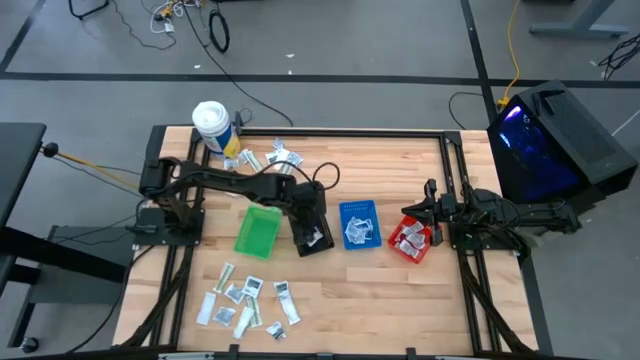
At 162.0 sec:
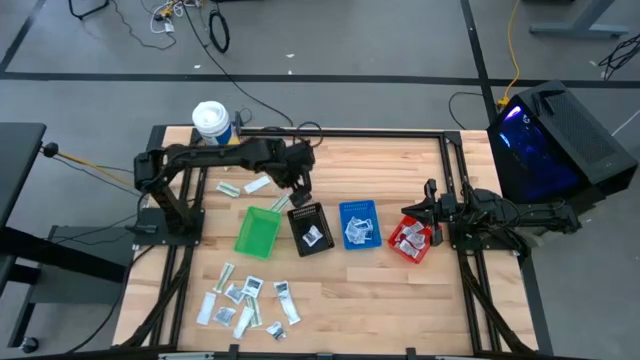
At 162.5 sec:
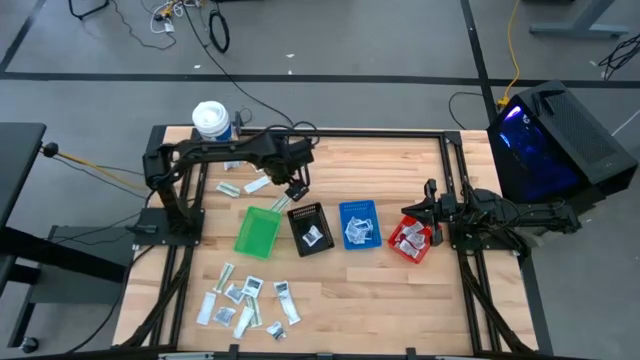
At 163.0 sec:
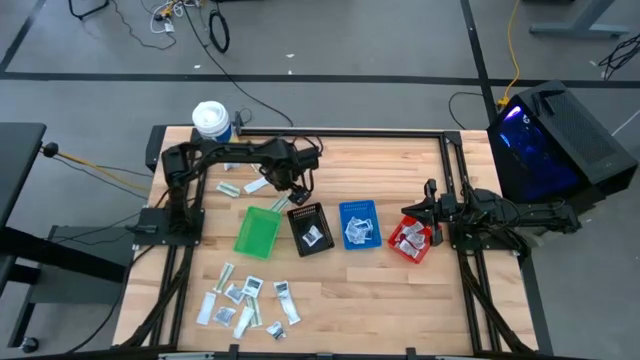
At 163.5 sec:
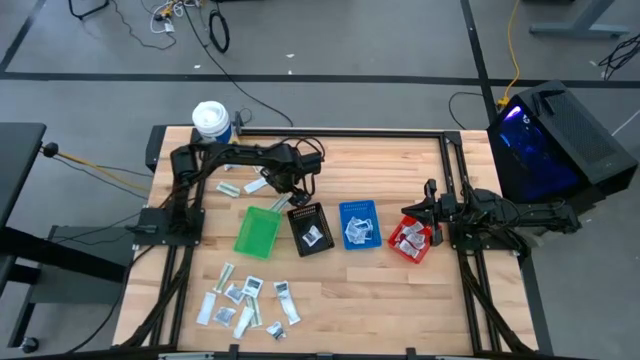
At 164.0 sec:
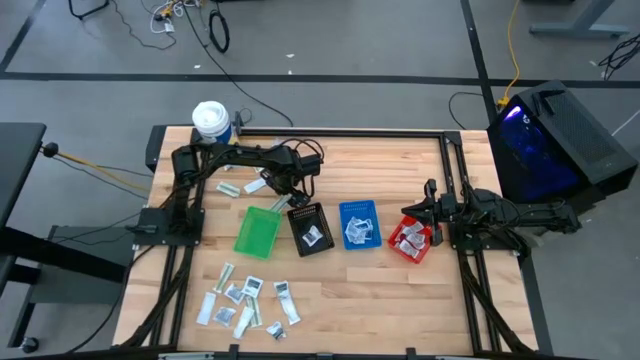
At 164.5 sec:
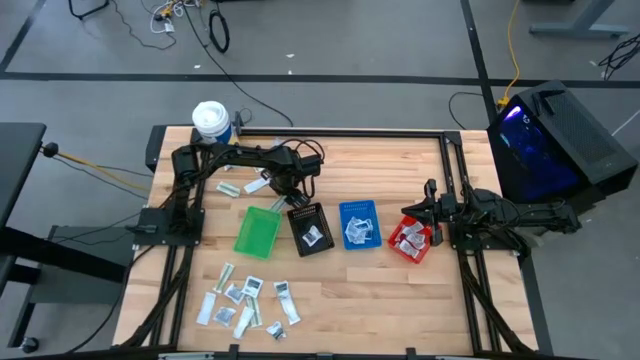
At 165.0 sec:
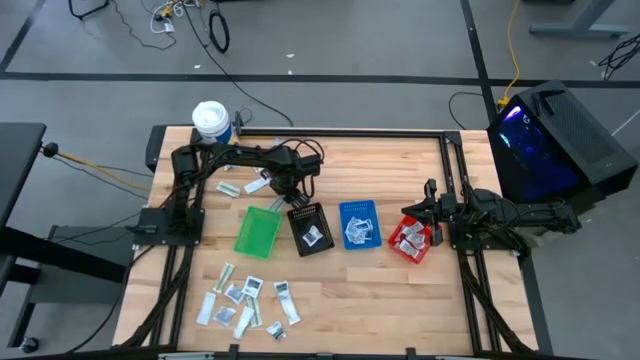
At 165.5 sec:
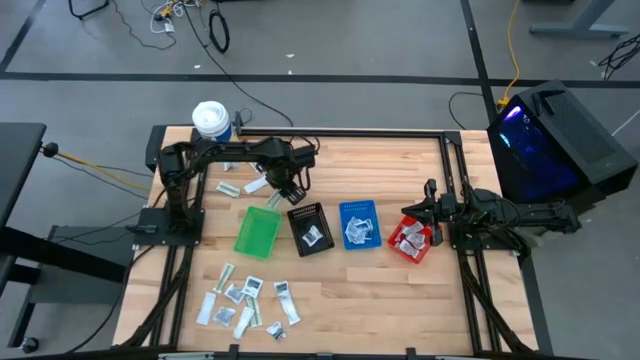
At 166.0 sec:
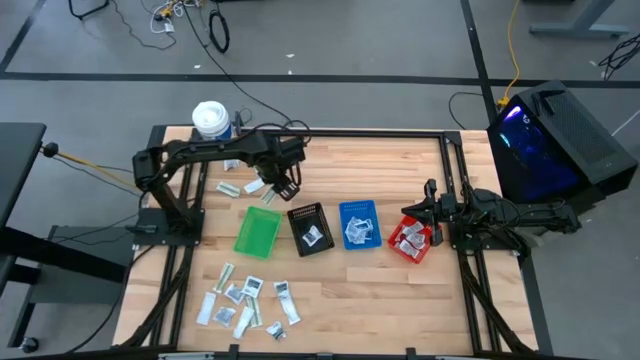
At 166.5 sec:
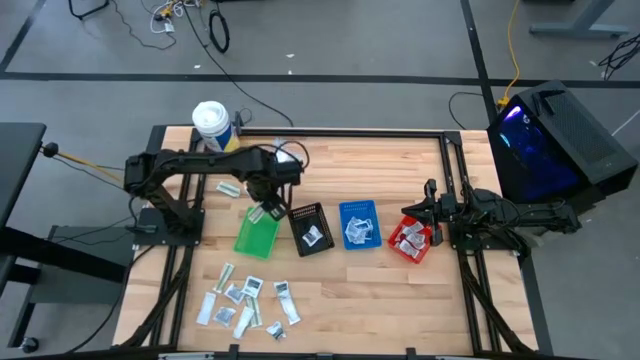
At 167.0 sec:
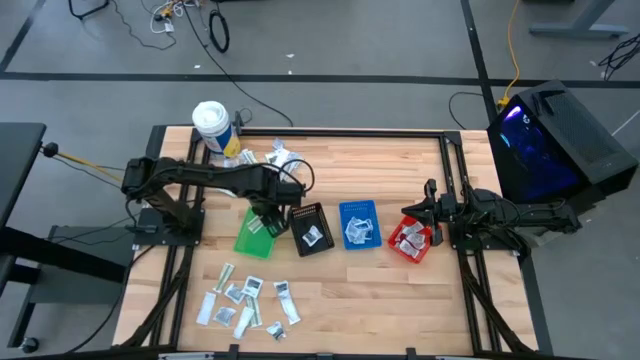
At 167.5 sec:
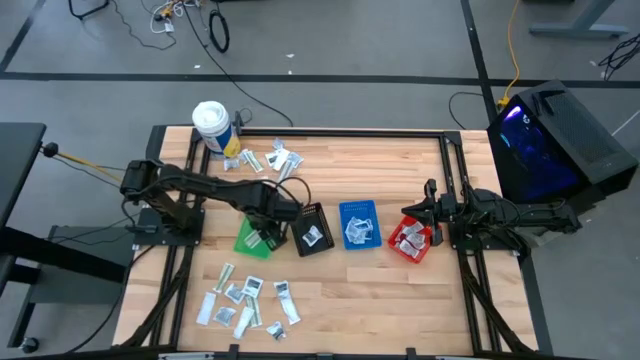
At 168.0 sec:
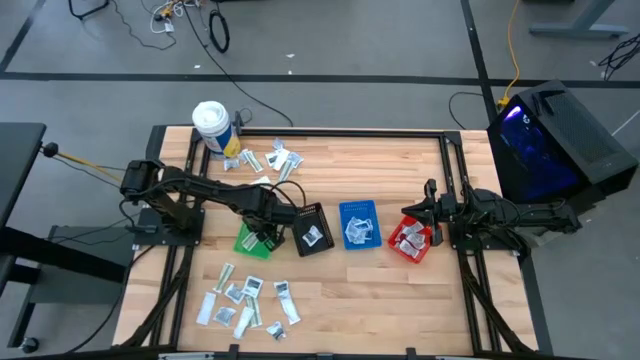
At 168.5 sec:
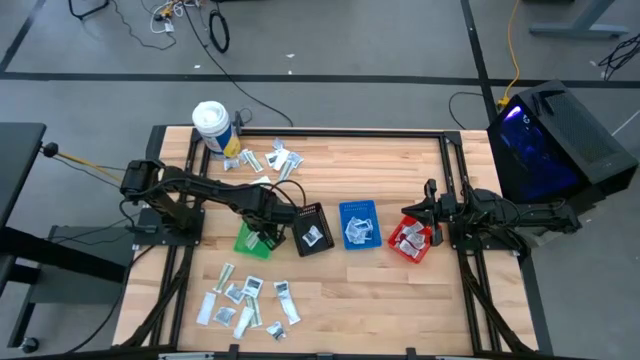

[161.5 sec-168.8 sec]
Task: Pick & Place First Aid Supplies
Put the bandage into the green basket

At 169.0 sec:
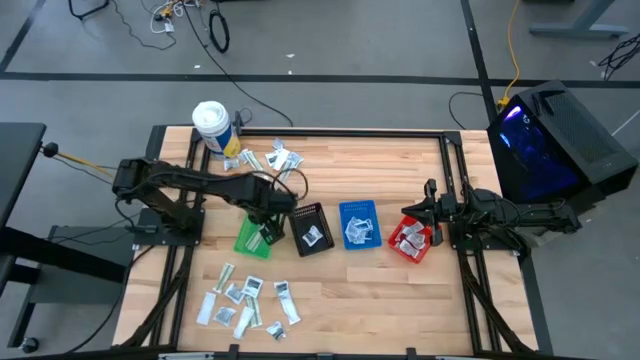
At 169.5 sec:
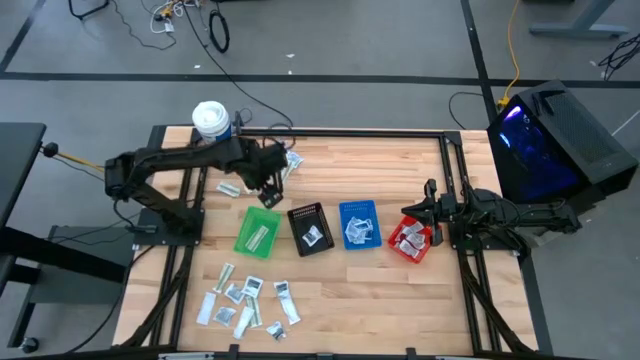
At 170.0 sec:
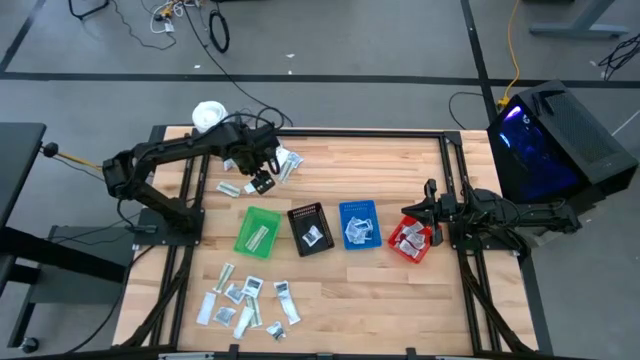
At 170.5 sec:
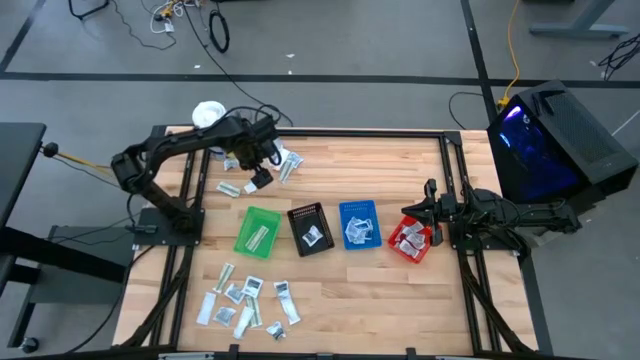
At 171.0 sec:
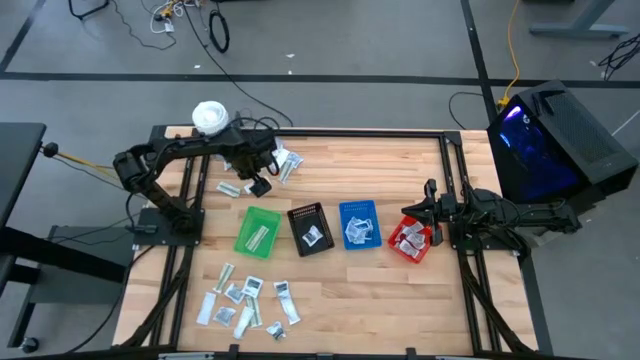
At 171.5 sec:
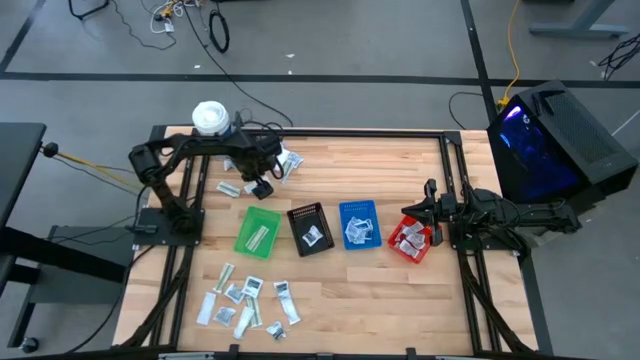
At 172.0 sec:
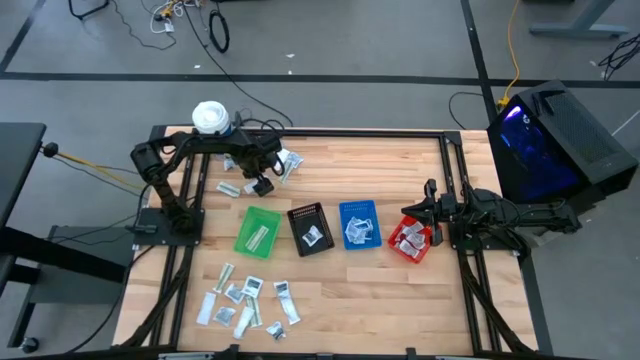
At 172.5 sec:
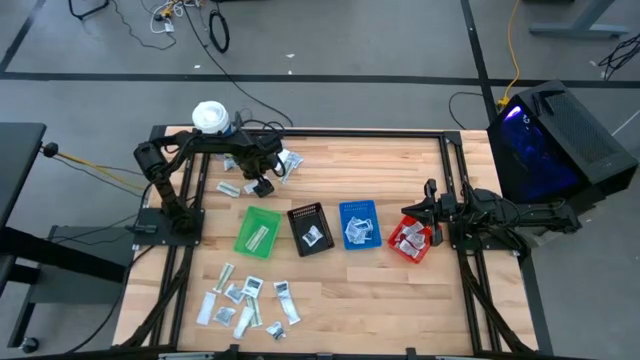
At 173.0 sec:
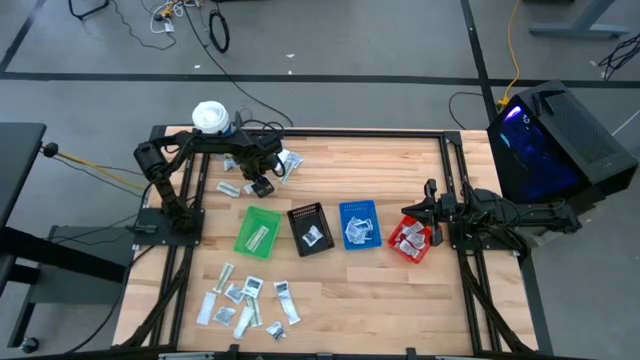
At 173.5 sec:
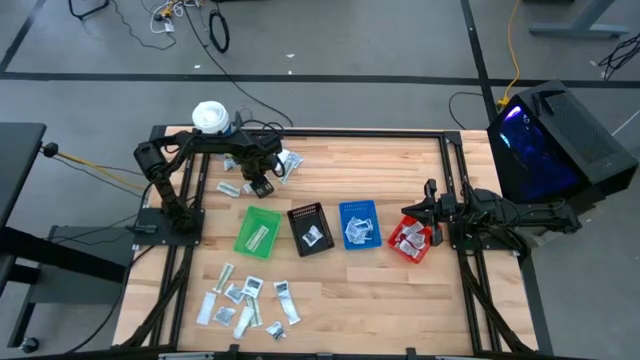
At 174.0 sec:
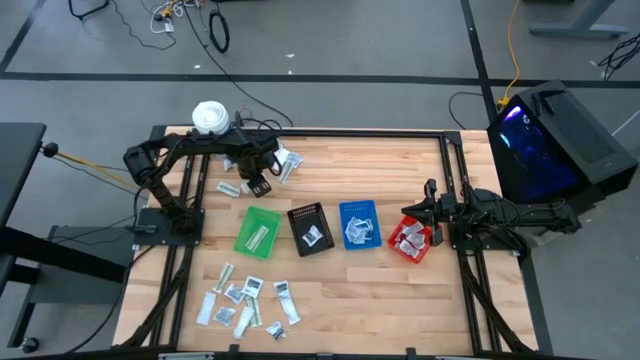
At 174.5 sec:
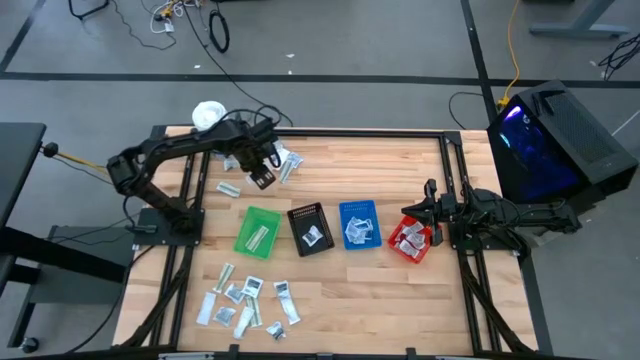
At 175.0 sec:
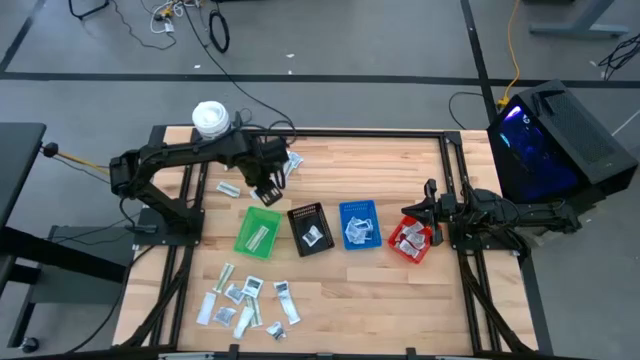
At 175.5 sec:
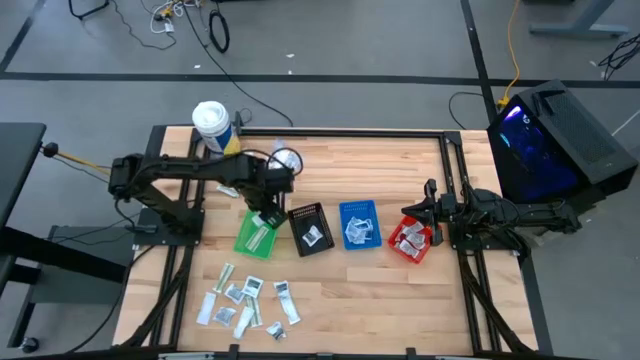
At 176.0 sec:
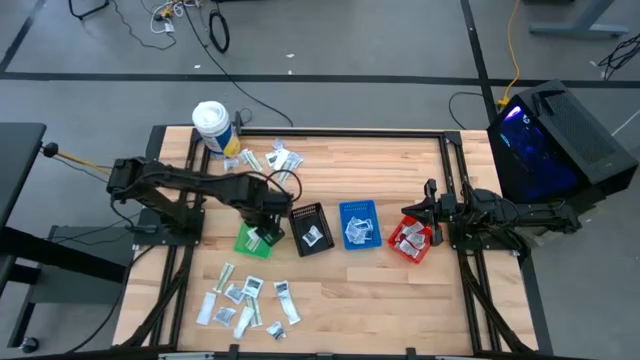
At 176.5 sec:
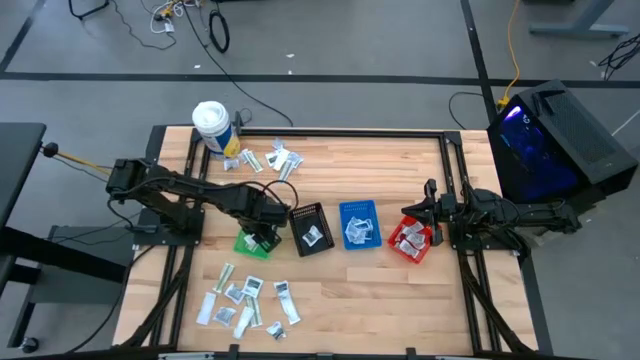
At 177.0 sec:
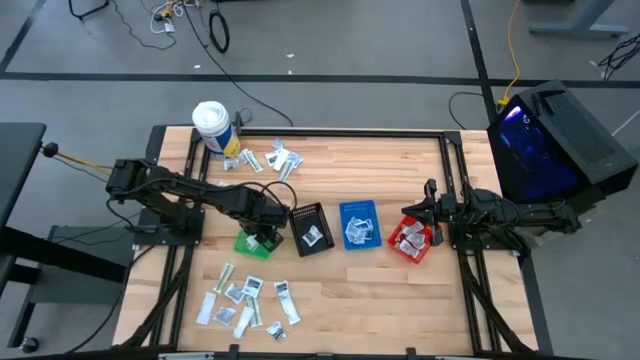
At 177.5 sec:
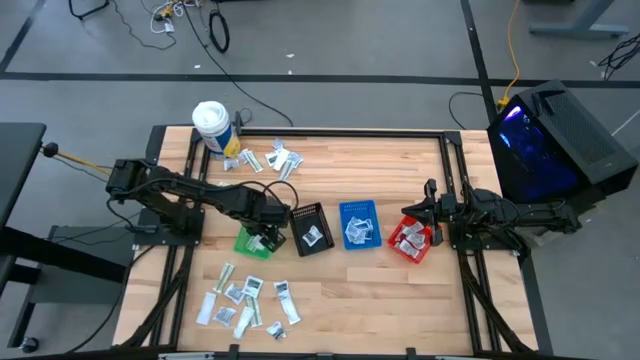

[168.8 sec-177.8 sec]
Put the bandage into the green basket
